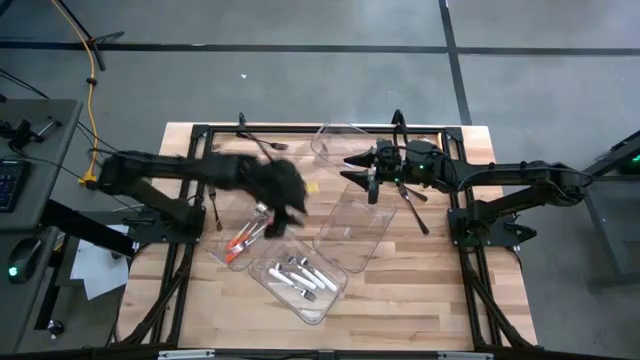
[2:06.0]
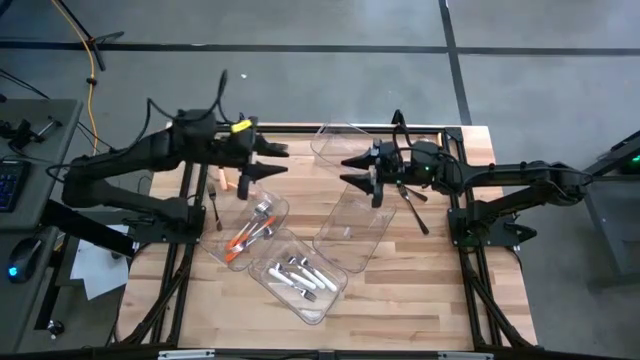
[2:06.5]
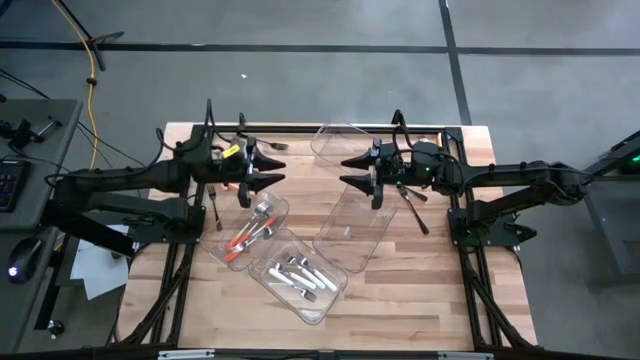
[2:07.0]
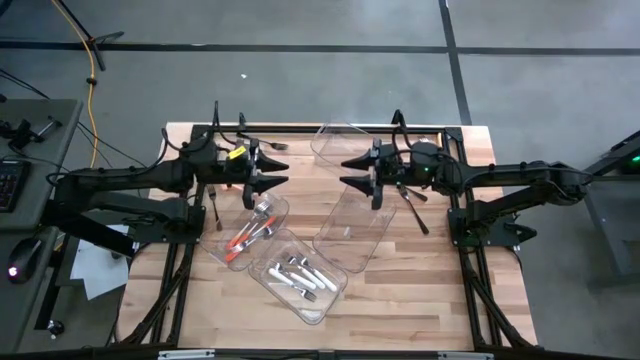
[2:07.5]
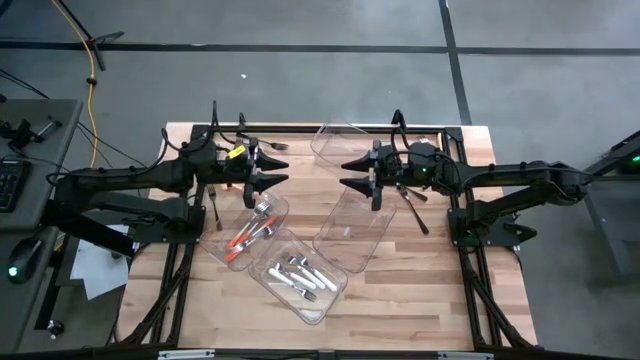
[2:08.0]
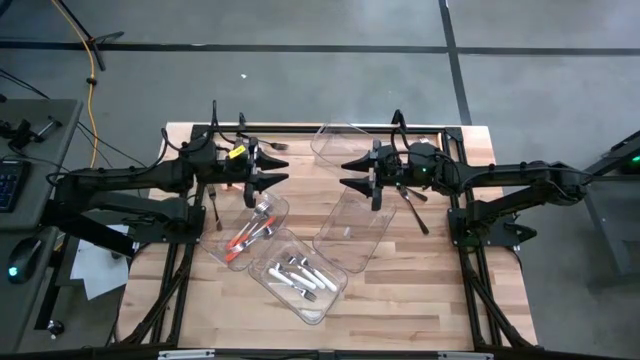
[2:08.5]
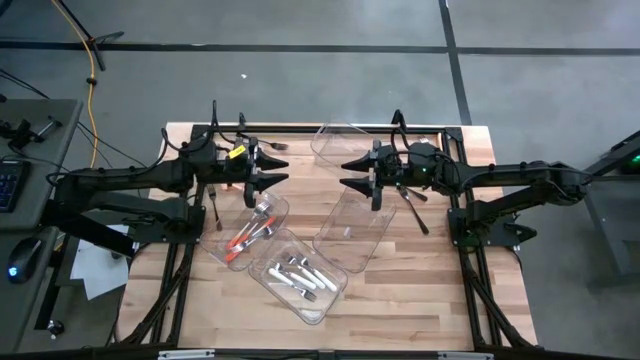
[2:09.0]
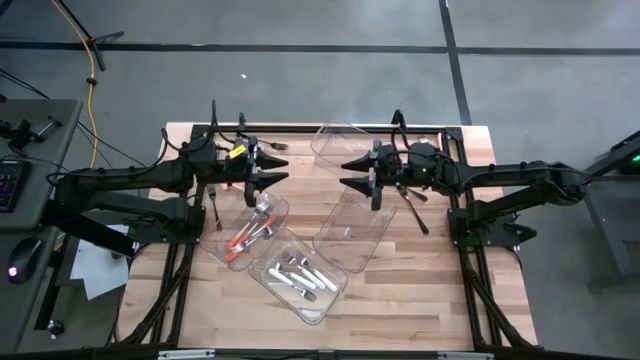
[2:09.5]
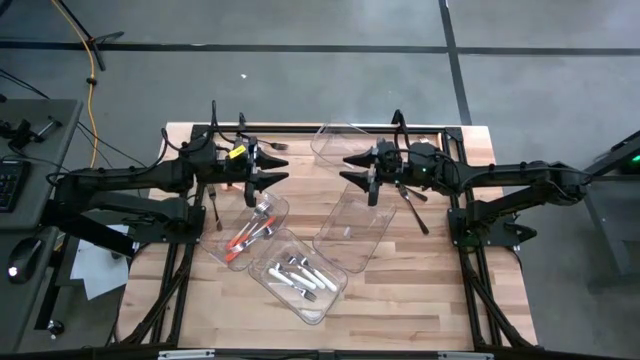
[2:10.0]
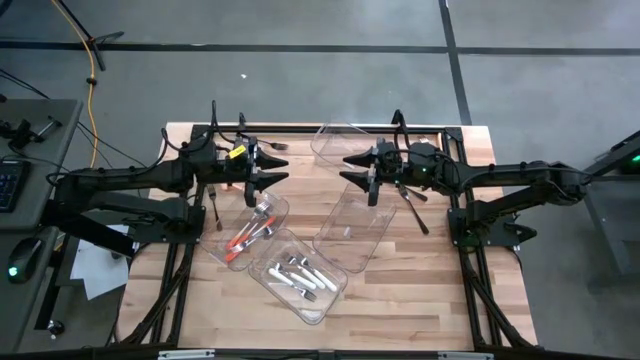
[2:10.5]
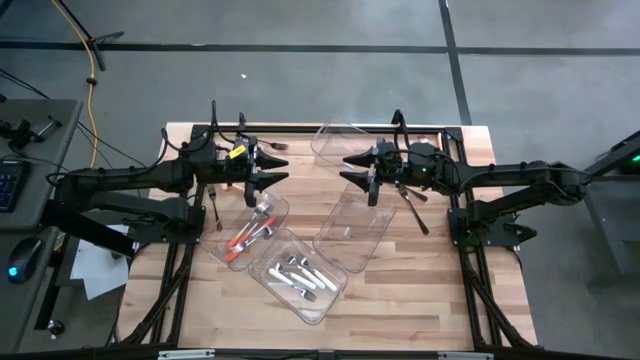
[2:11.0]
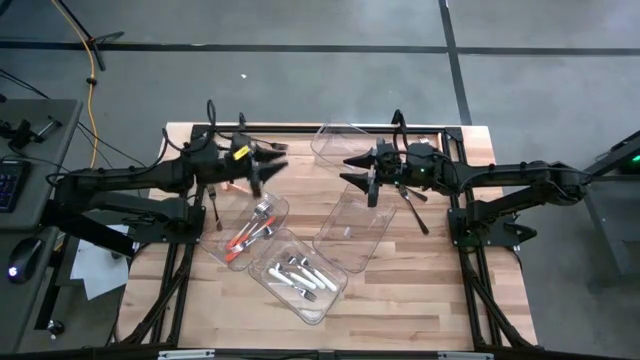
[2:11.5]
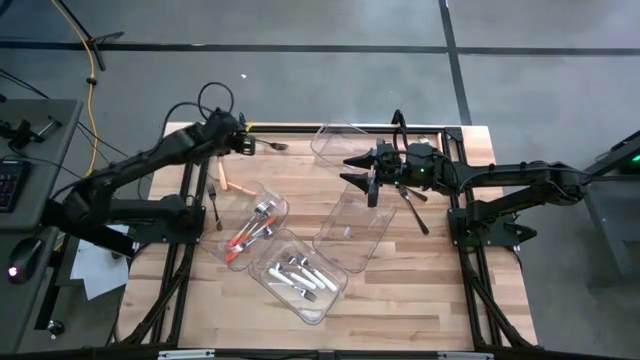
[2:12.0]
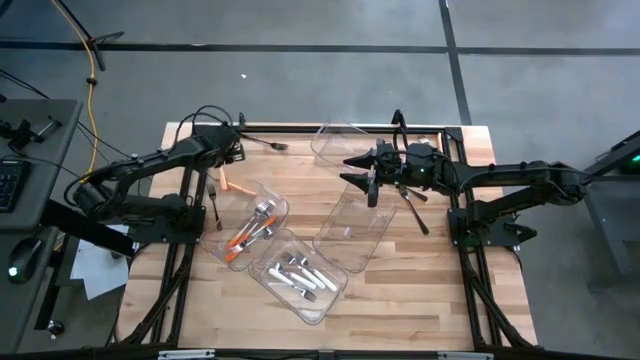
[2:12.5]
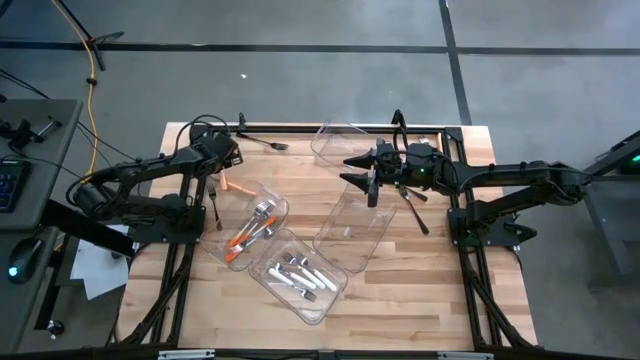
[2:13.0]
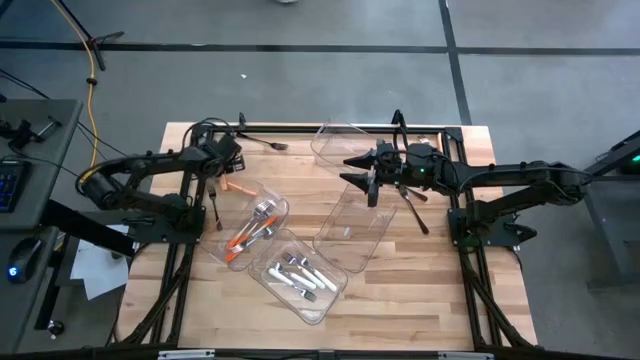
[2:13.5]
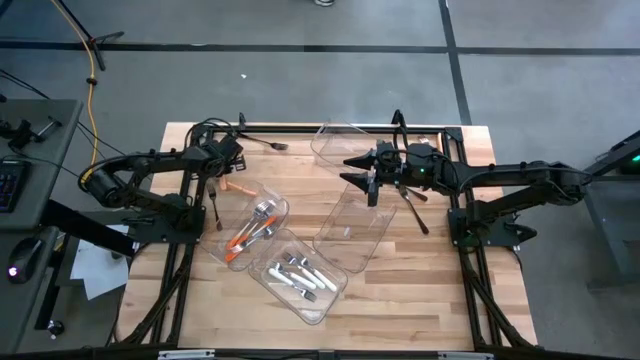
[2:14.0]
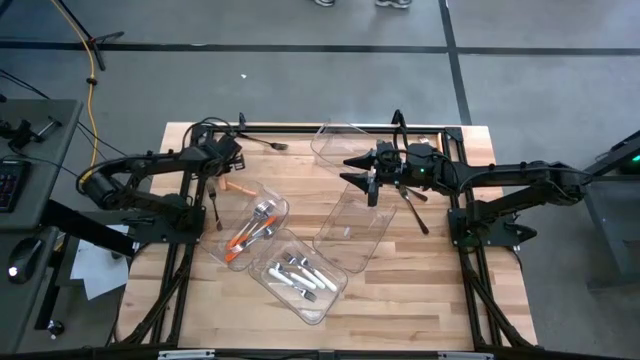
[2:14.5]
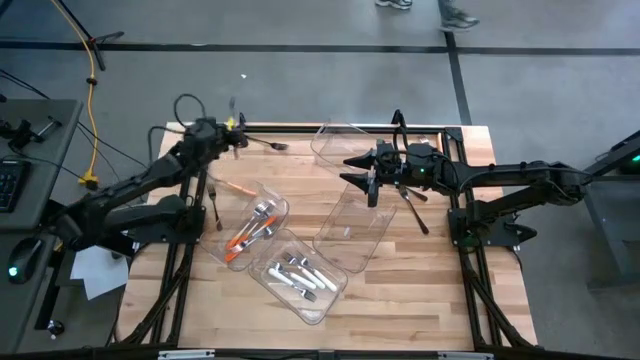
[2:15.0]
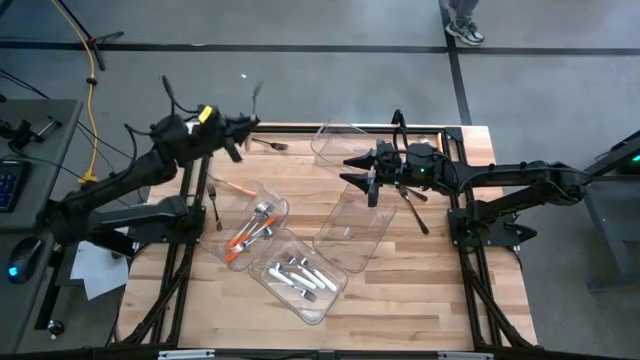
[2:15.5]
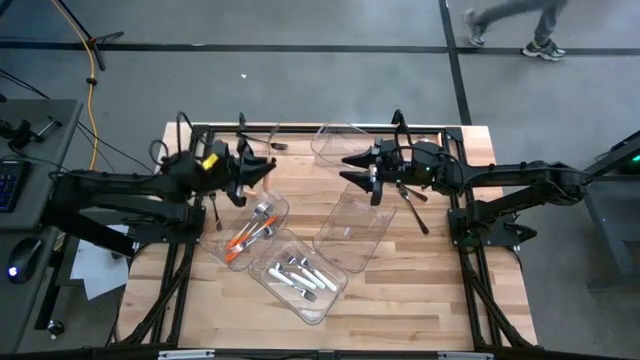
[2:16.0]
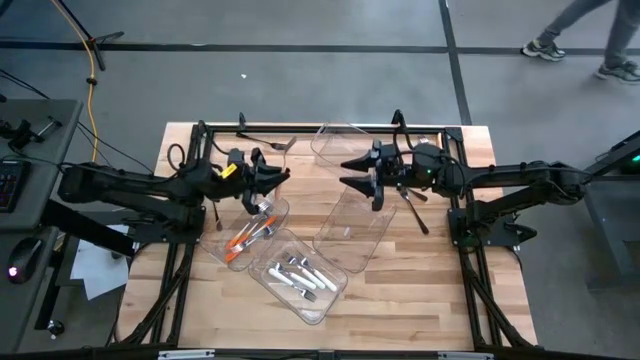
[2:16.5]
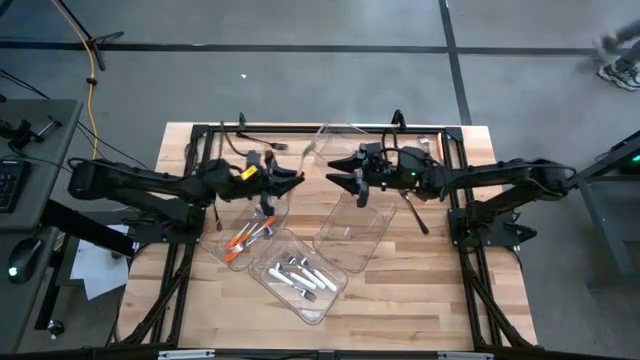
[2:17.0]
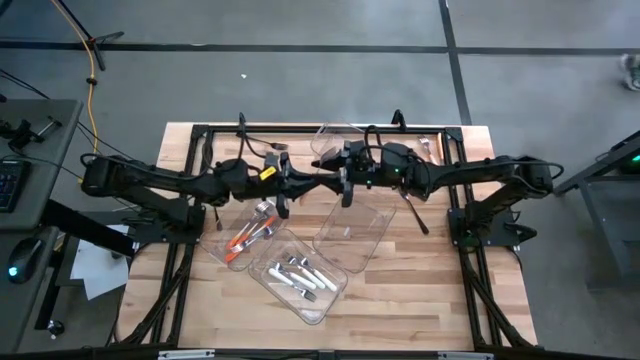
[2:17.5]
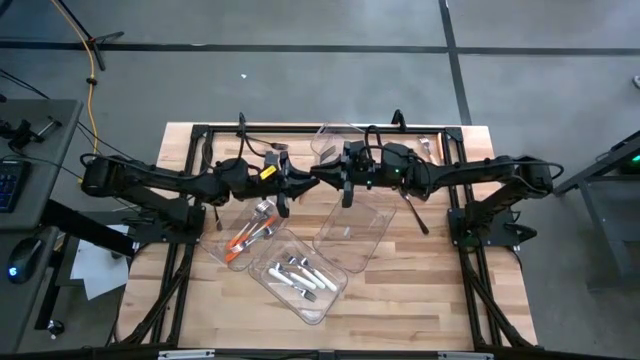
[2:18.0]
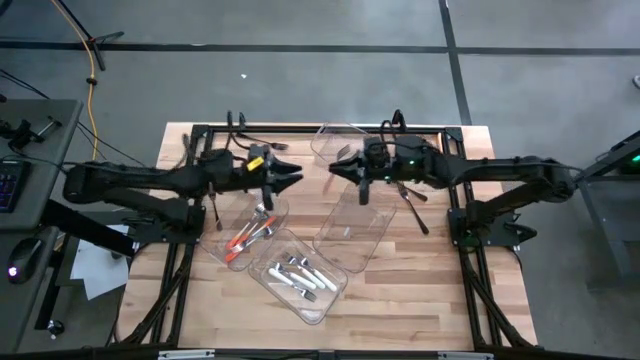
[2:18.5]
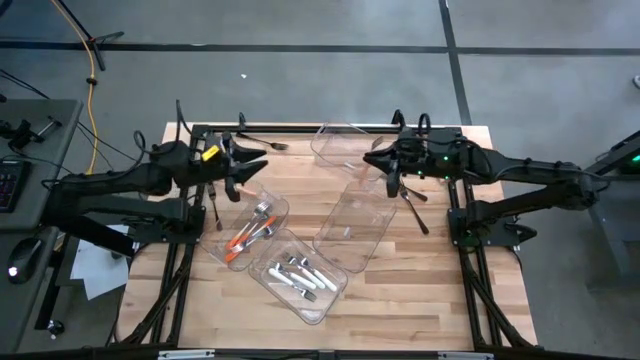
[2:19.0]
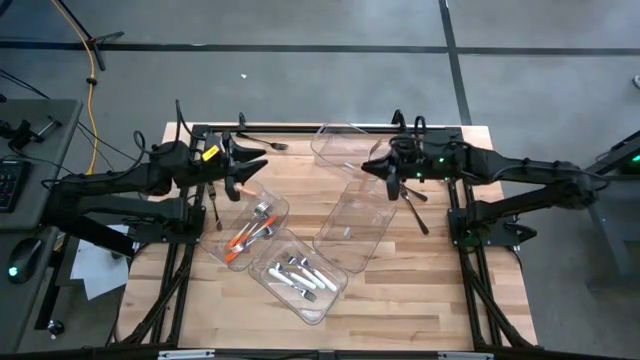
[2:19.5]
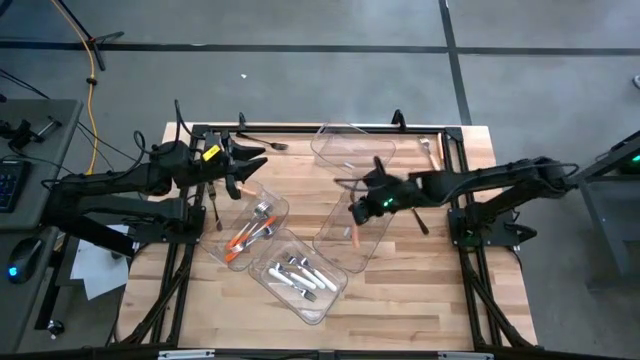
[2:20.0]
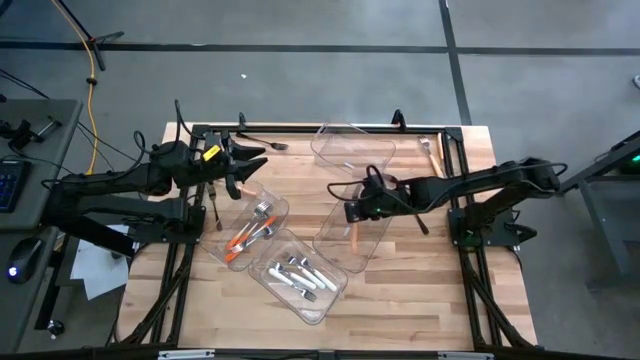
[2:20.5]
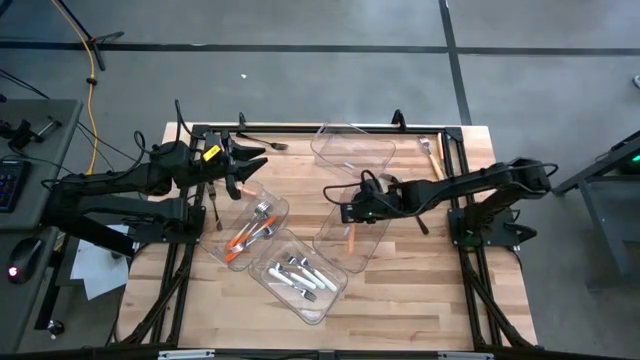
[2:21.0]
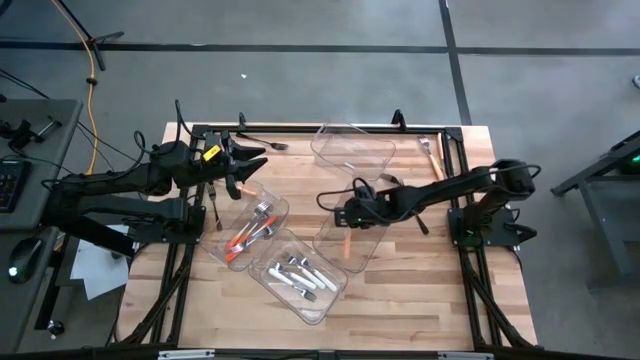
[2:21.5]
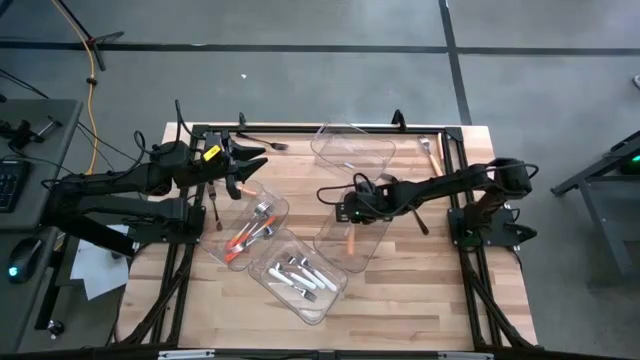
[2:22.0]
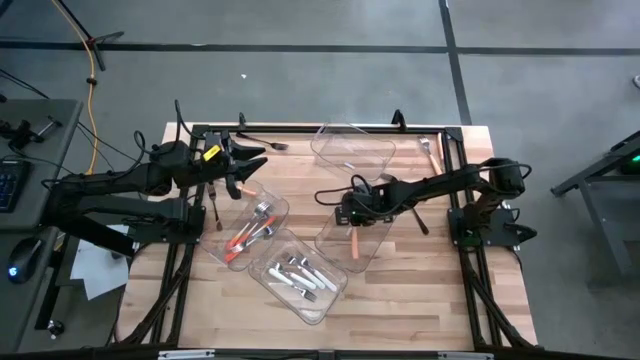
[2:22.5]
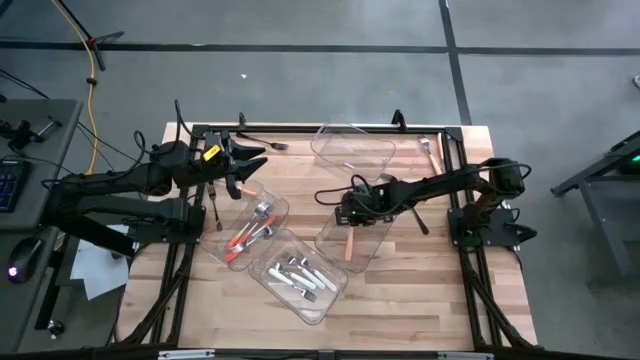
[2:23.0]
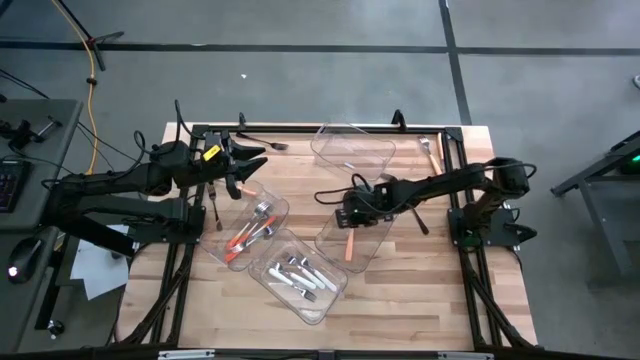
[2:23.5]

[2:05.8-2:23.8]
Task: Sort silverware by color (type)
Put the light orange fork into the middle right transparent bin

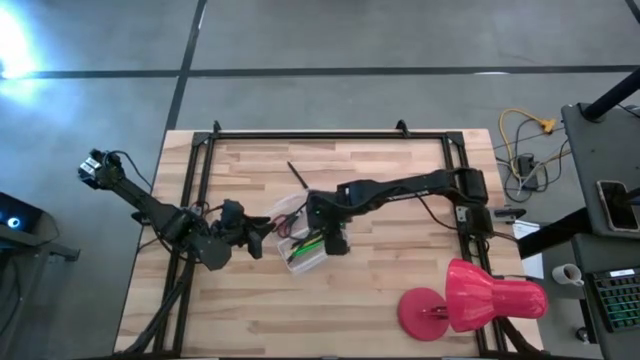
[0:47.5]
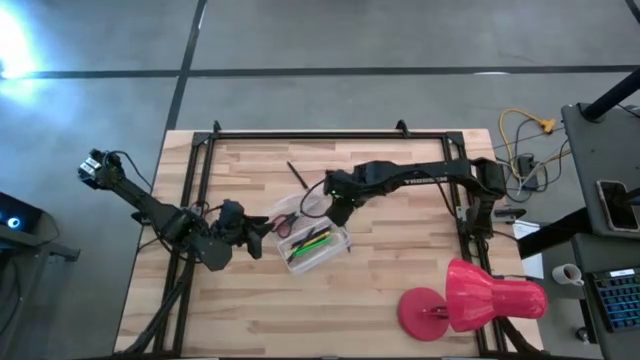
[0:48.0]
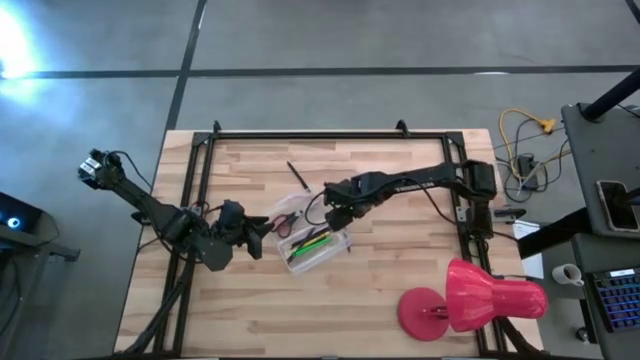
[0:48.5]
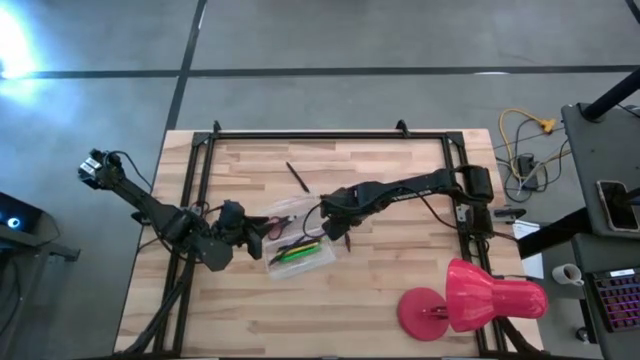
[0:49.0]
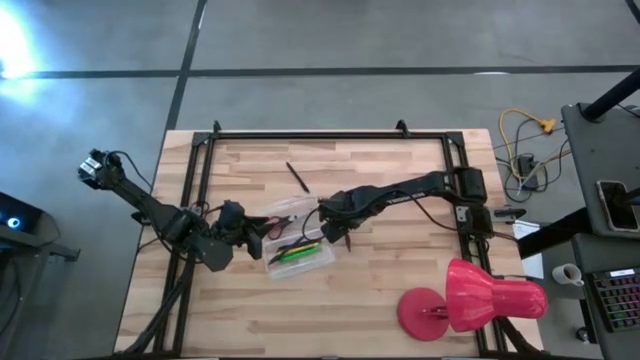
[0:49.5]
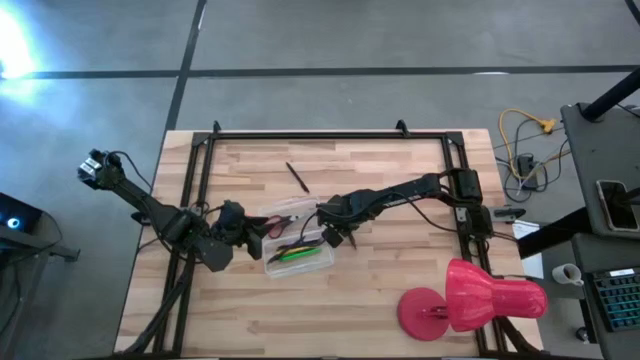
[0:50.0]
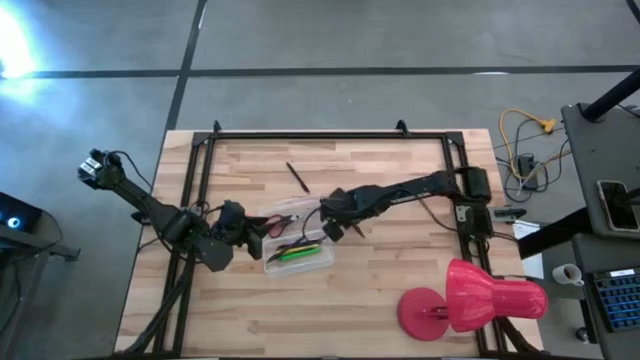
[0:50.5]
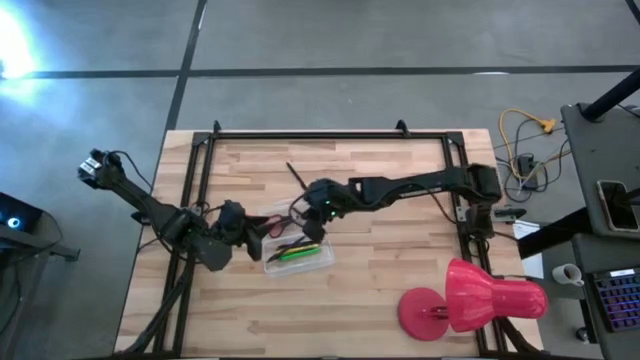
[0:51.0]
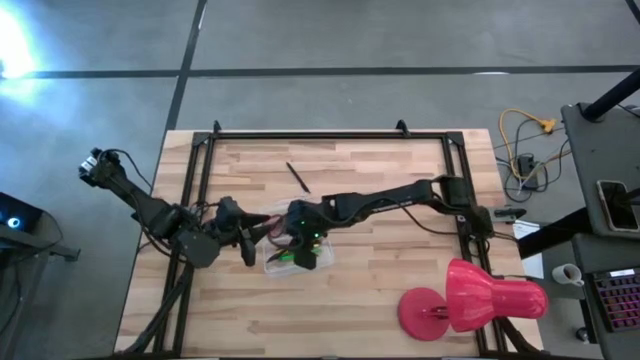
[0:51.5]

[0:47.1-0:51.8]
Task: Pick & place school supplies into a supply box
Put the brown pen into the stationery box
